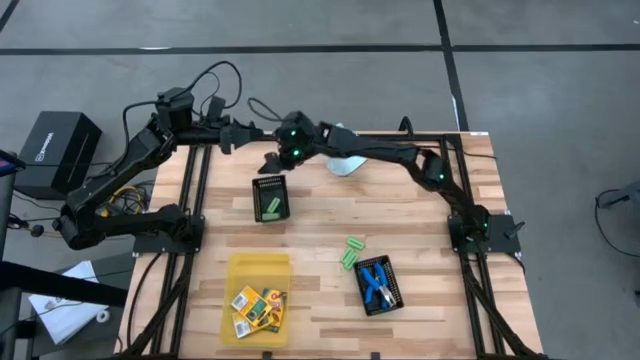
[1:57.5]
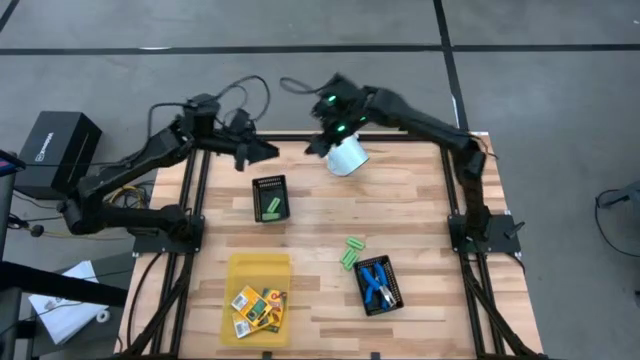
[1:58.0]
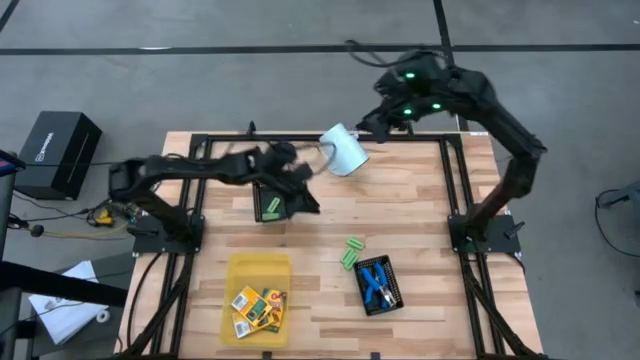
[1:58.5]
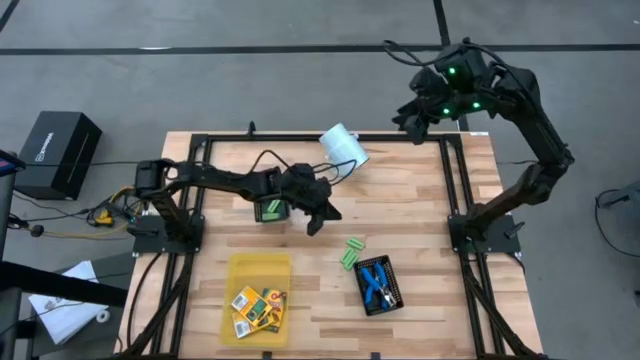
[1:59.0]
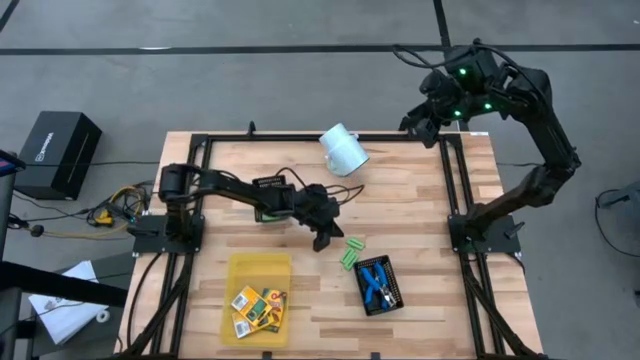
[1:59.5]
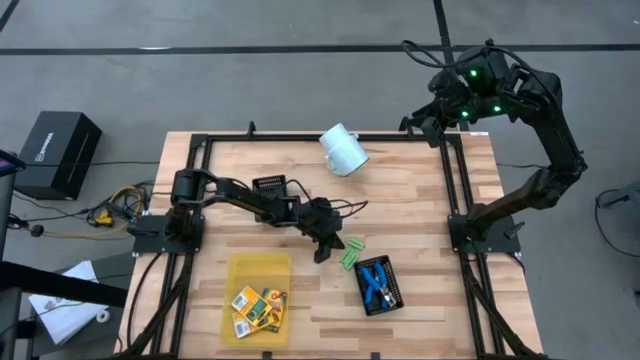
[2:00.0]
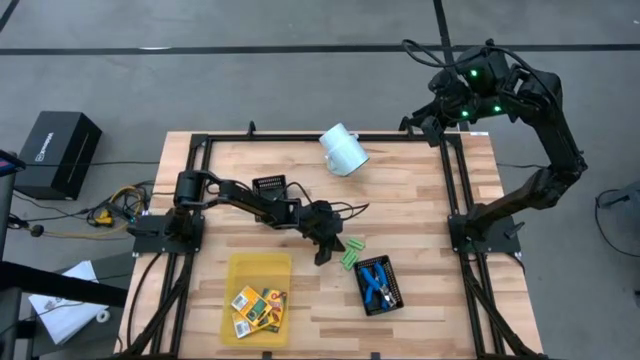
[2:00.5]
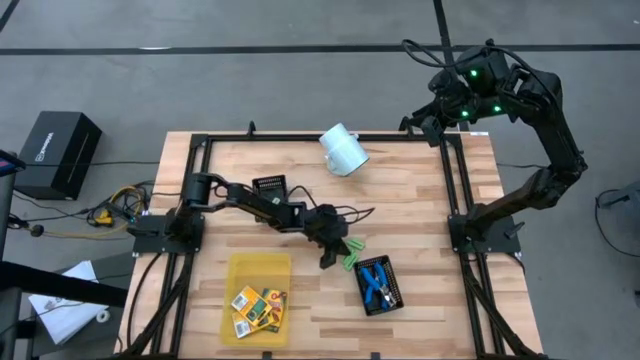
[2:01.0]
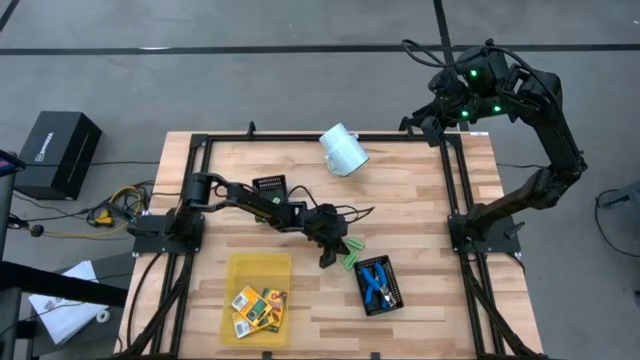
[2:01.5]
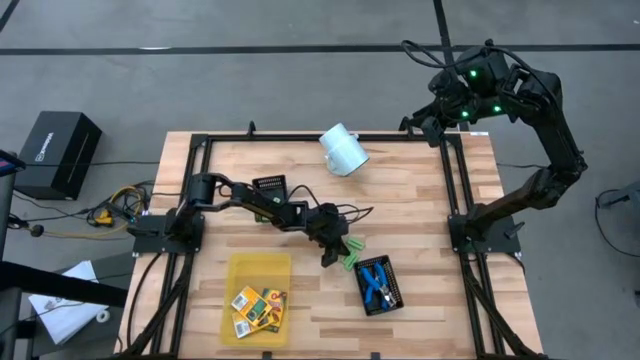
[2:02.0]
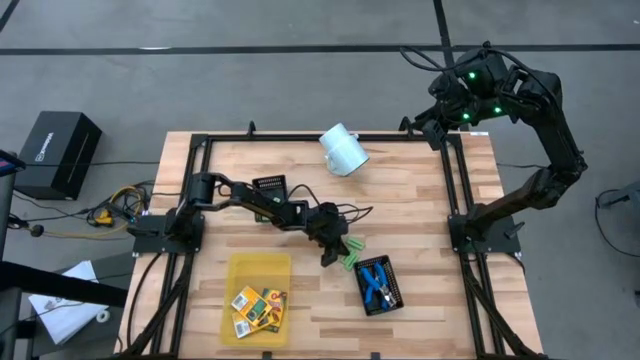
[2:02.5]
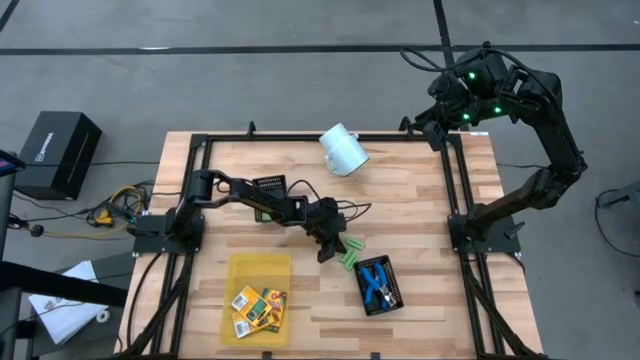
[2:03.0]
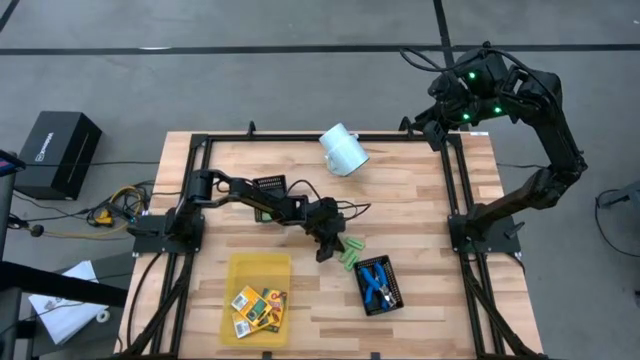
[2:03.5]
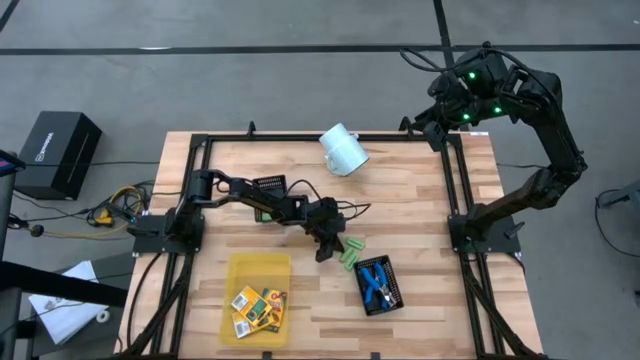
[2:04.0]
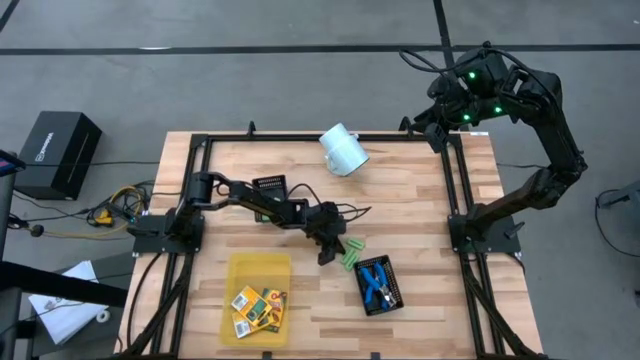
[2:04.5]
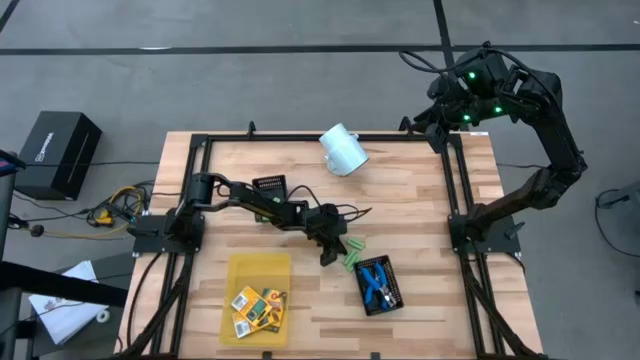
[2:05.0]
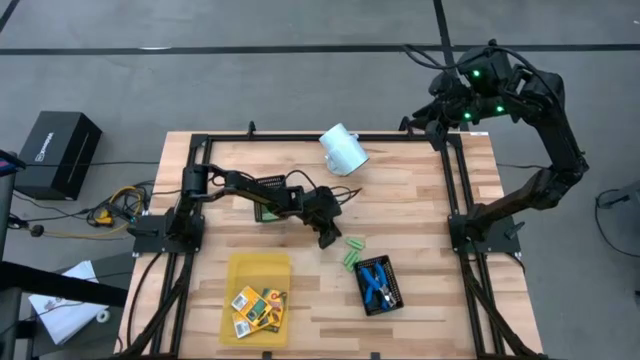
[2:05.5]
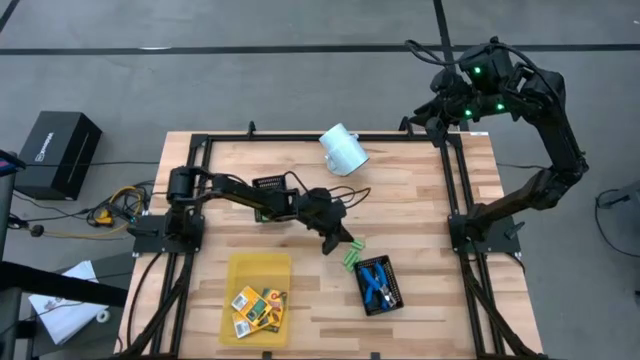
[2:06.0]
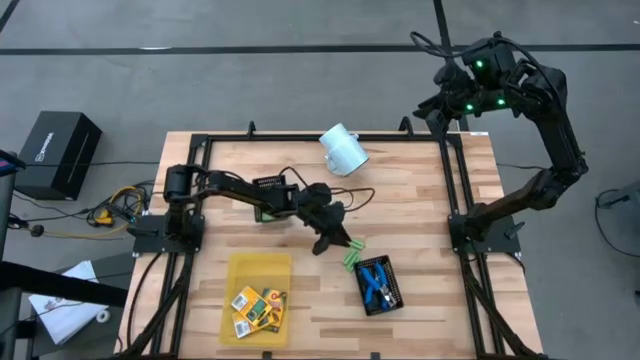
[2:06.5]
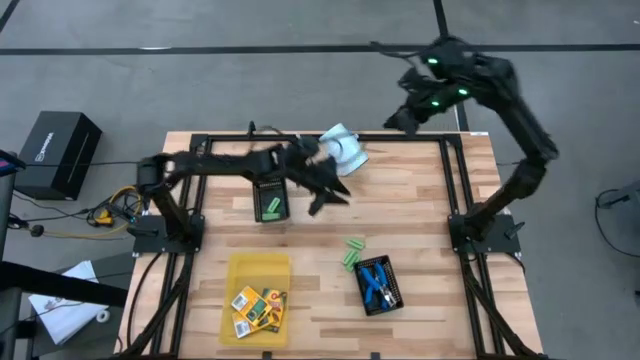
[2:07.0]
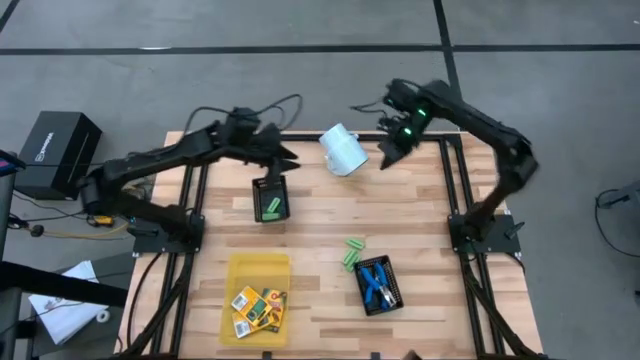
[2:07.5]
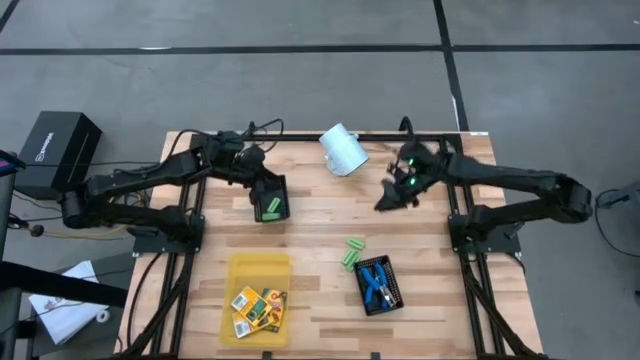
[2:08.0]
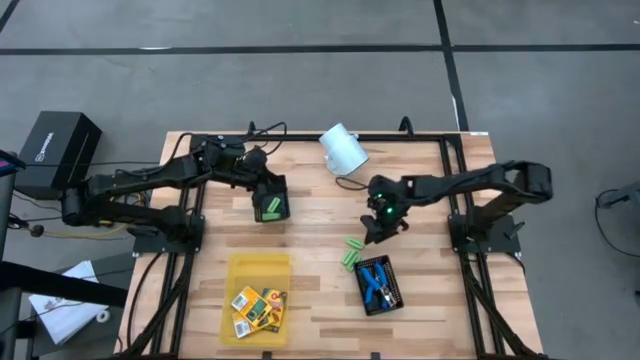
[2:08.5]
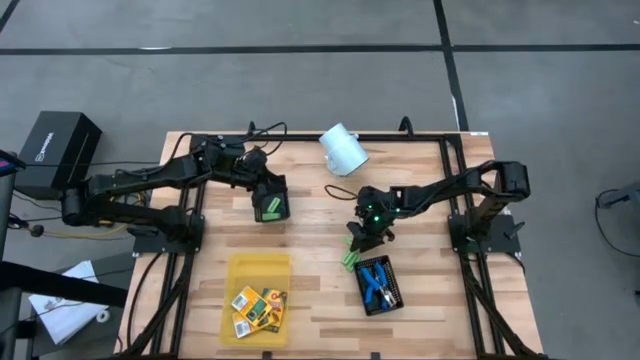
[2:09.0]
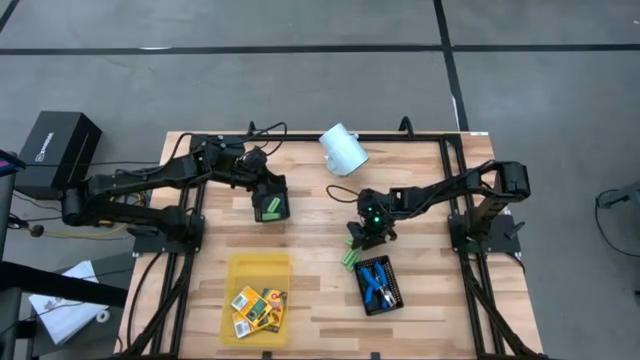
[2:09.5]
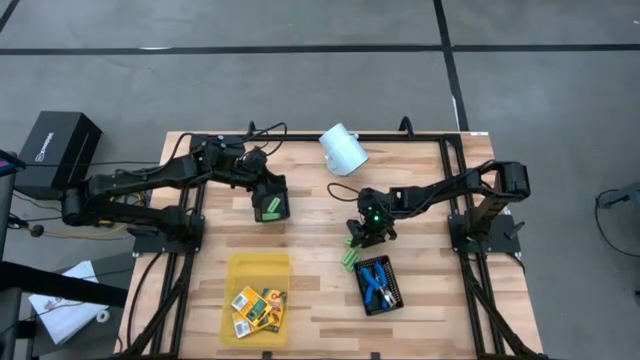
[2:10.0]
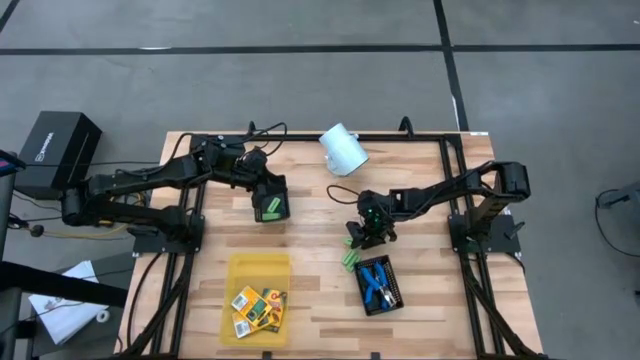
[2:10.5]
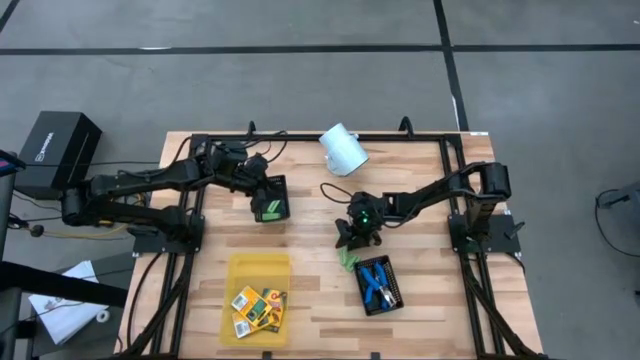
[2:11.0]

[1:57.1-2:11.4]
Task: Pick & Place School Supplies
Put the green eraser into the top black bin

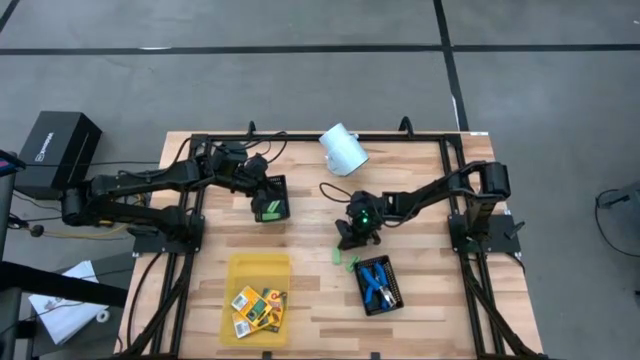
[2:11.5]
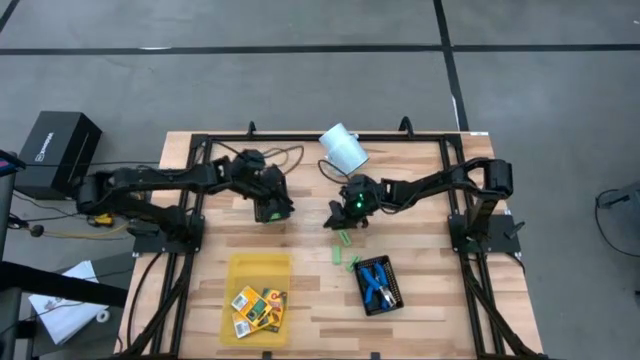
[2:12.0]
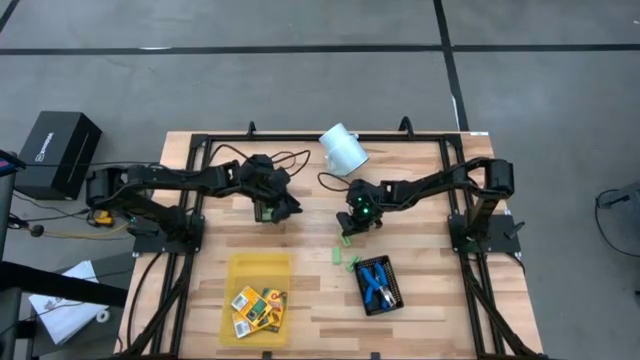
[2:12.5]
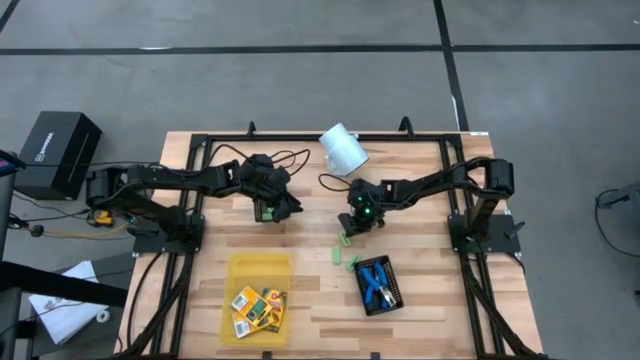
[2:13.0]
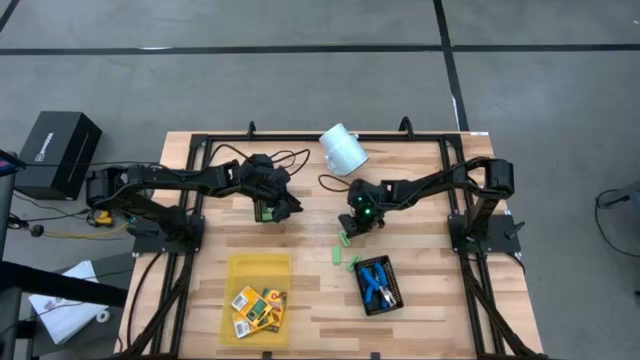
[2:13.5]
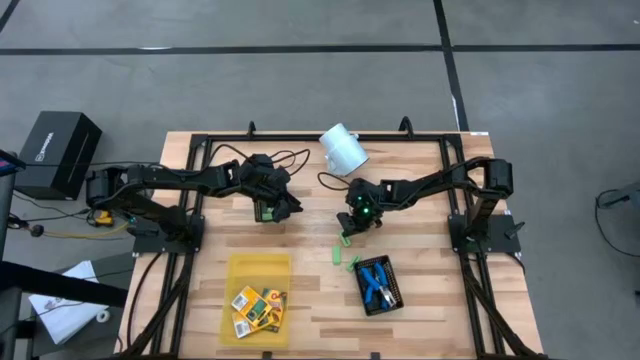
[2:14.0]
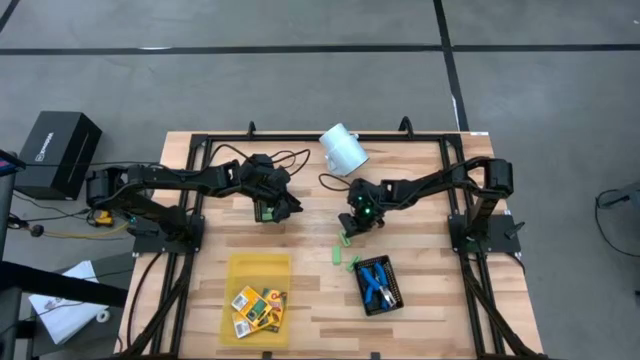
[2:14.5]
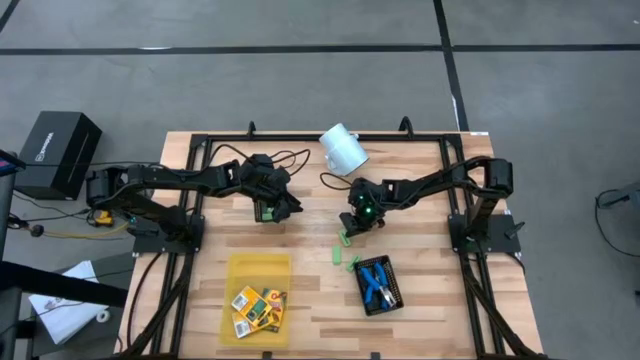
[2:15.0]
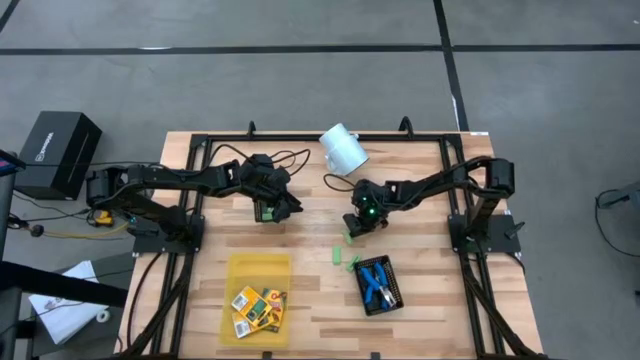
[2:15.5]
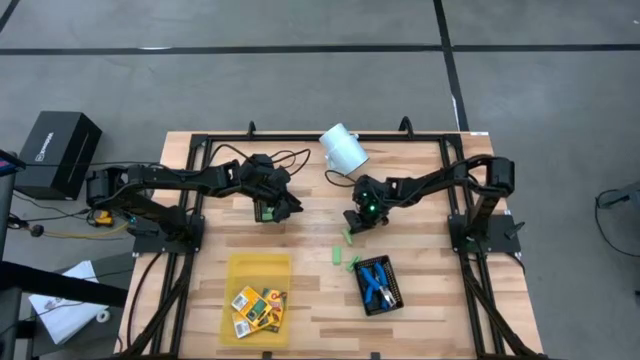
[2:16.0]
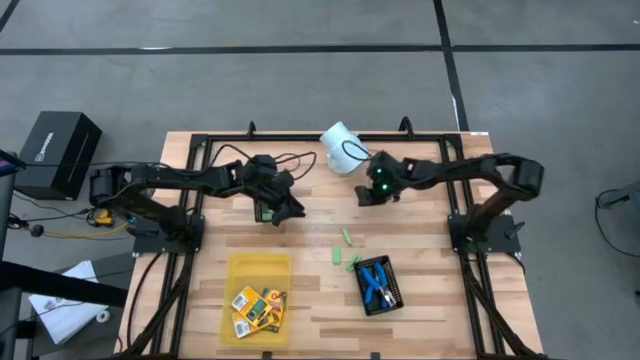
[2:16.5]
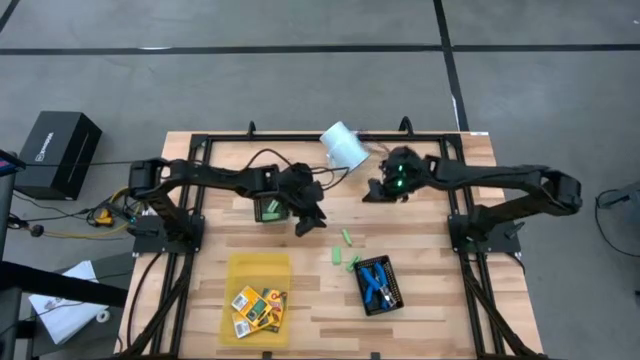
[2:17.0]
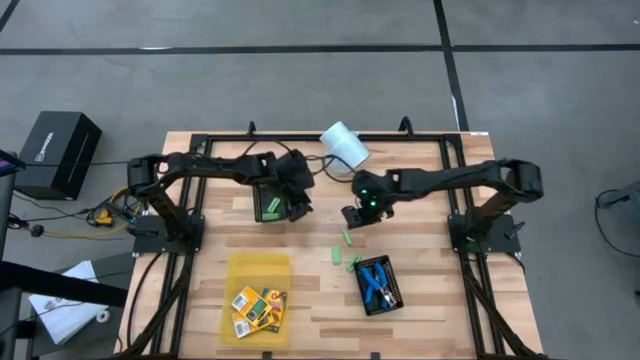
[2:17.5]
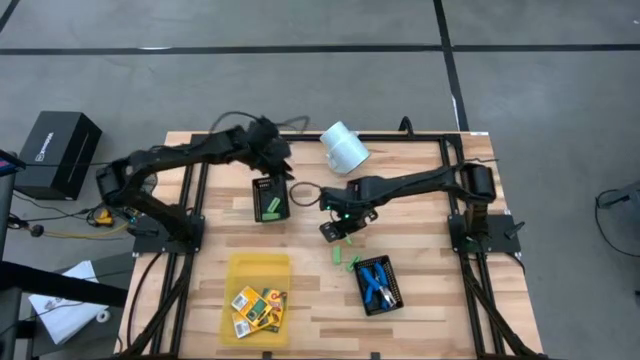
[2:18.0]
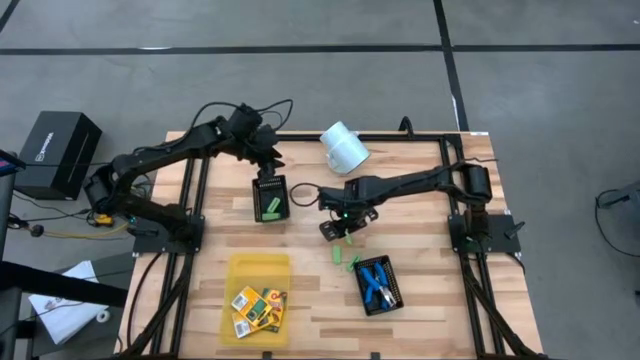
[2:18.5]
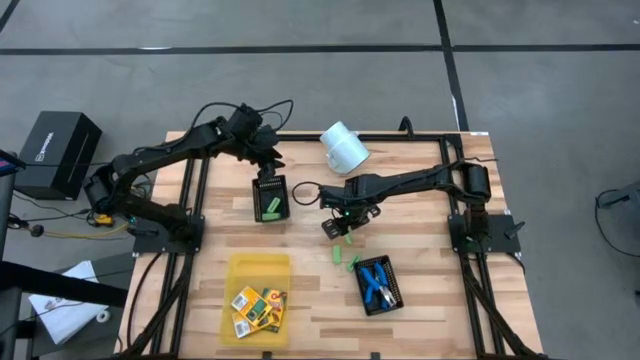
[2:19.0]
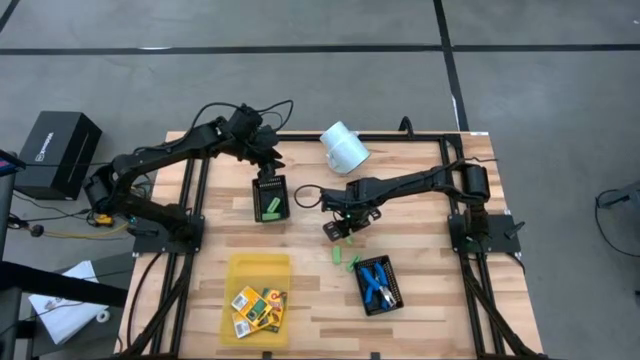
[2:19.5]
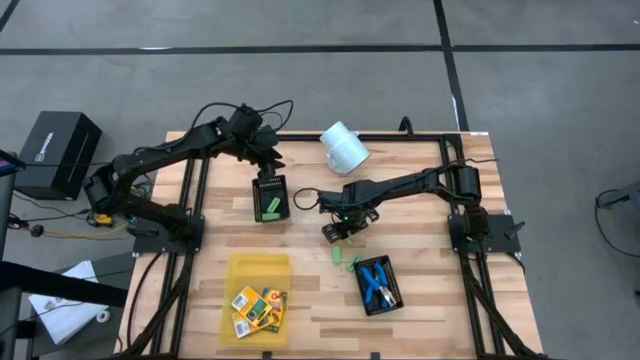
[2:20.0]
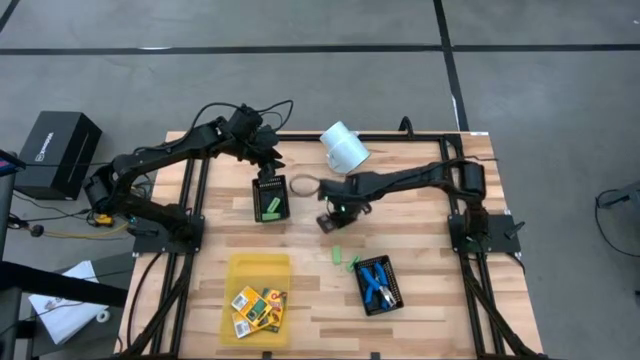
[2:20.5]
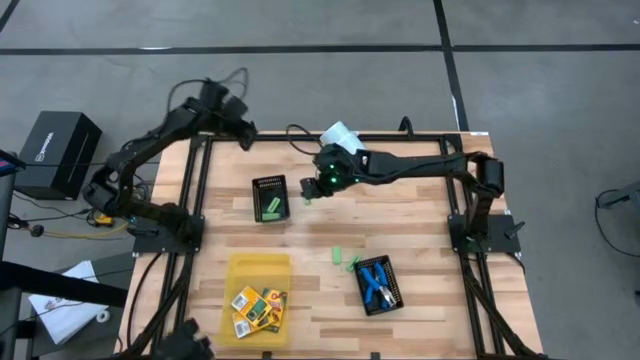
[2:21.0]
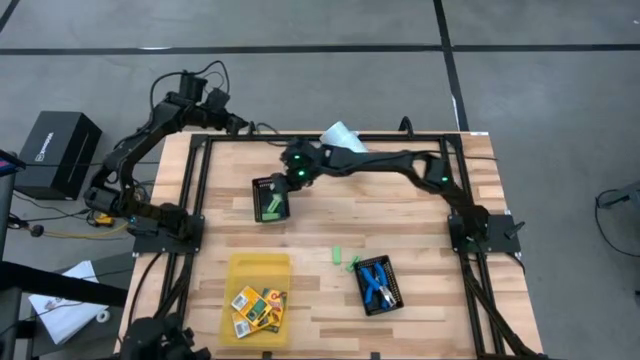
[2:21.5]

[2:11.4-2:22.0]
Put the green eraser into the top black bin
